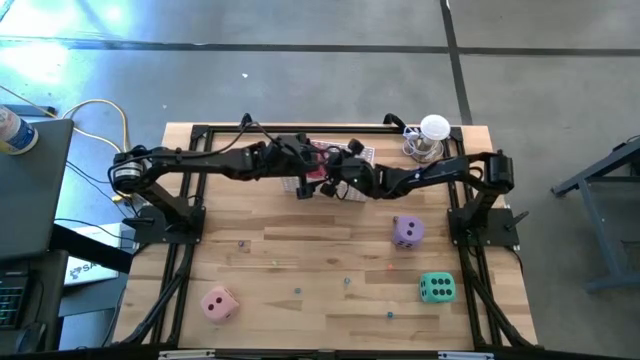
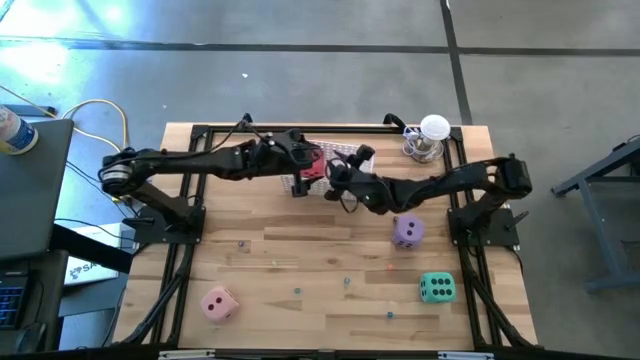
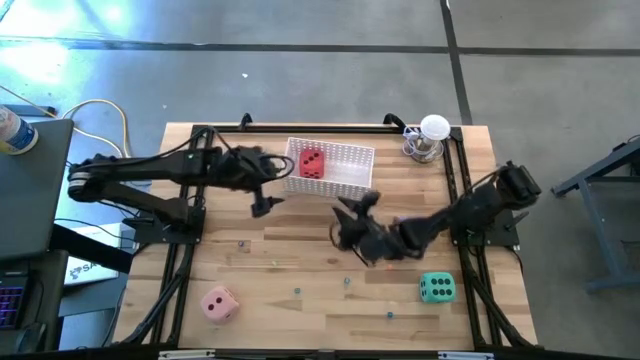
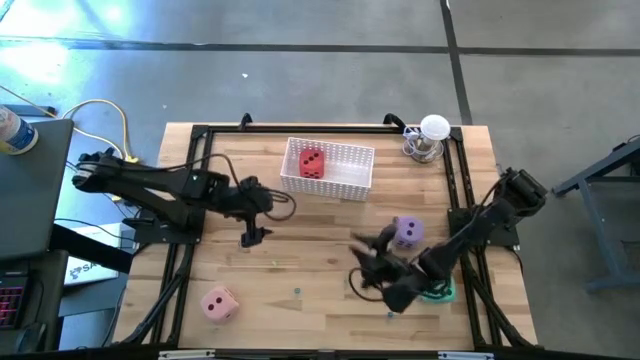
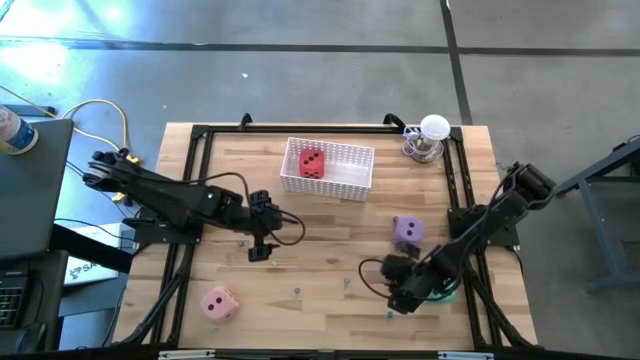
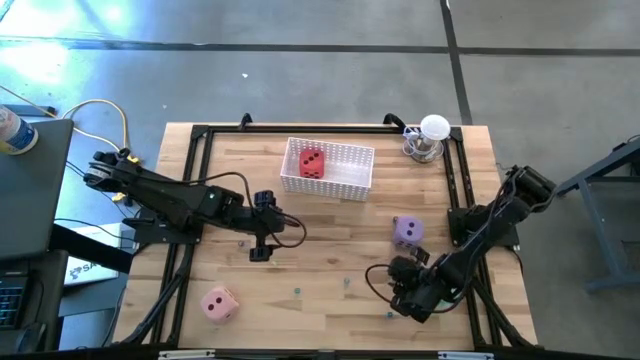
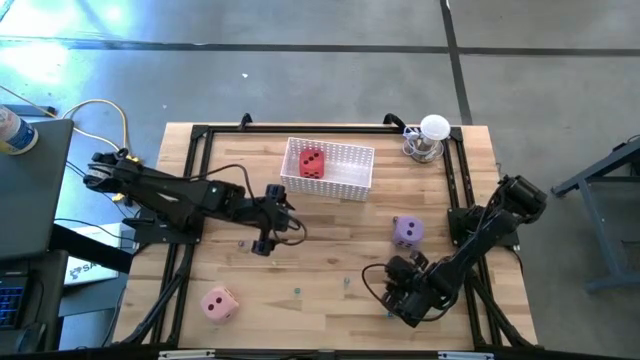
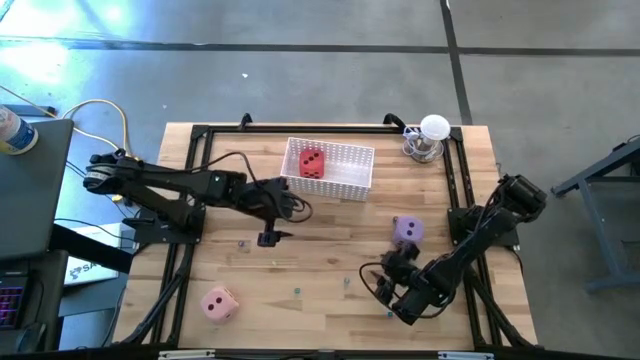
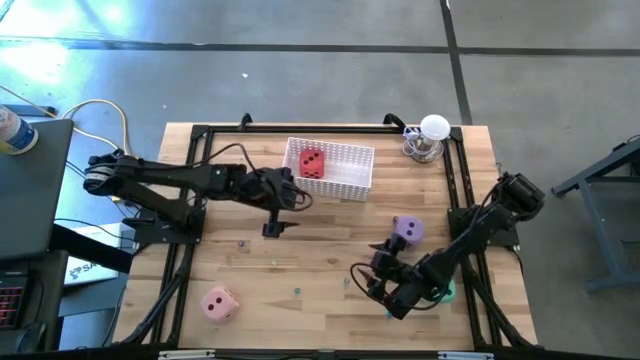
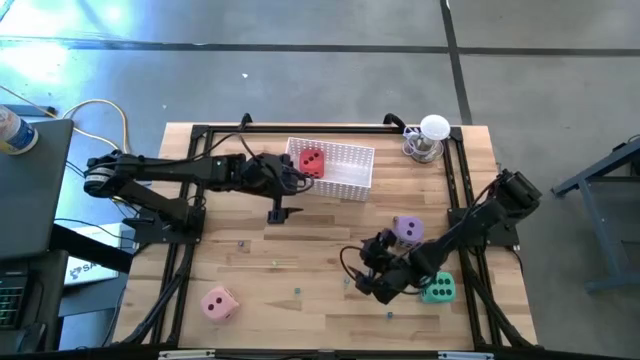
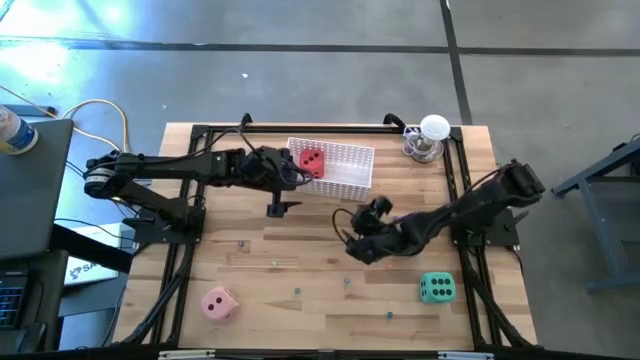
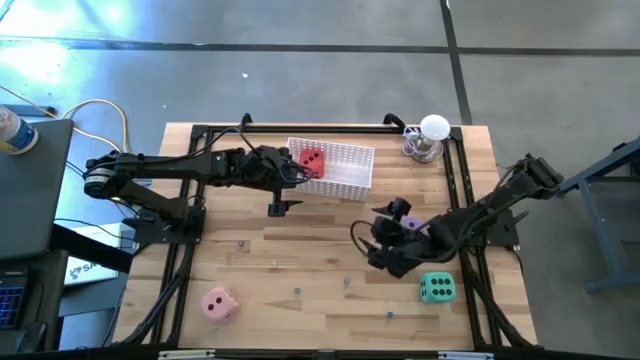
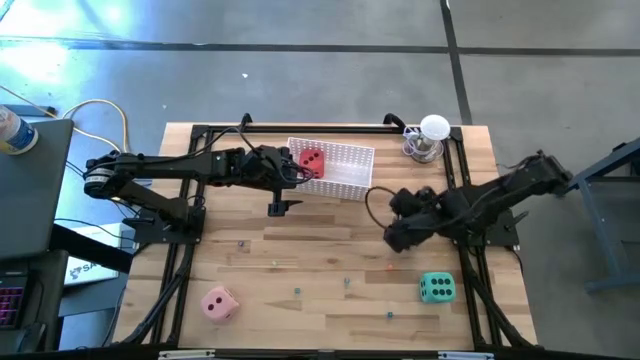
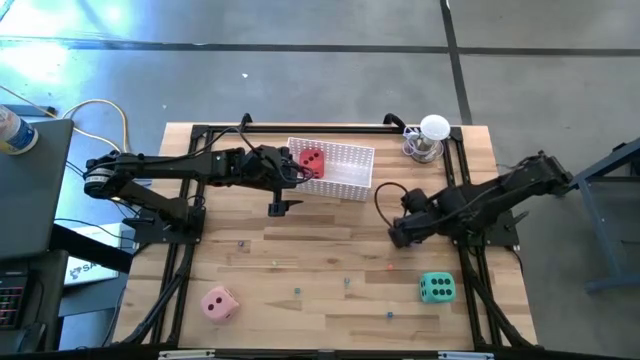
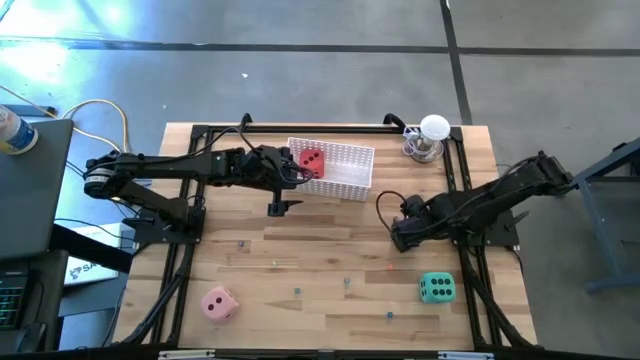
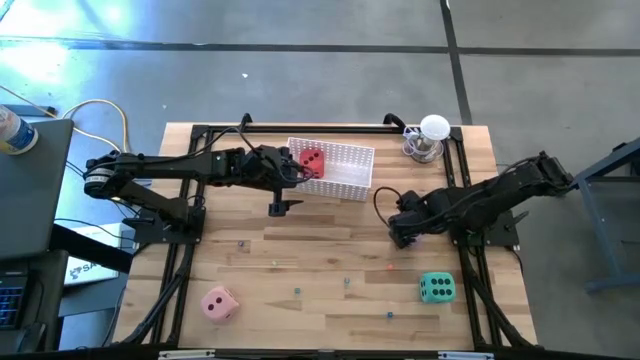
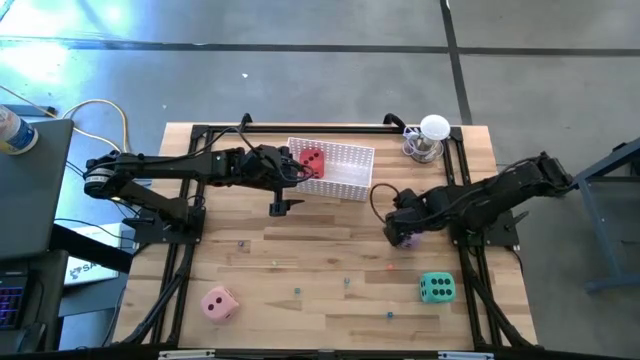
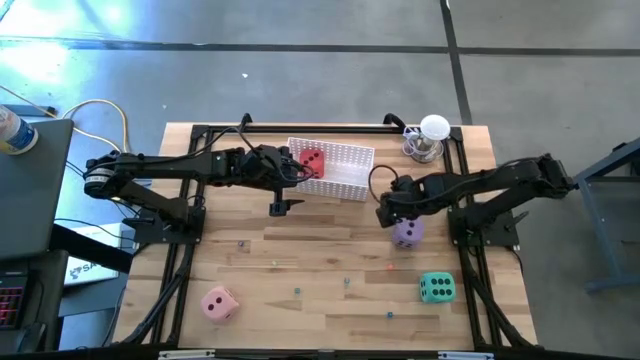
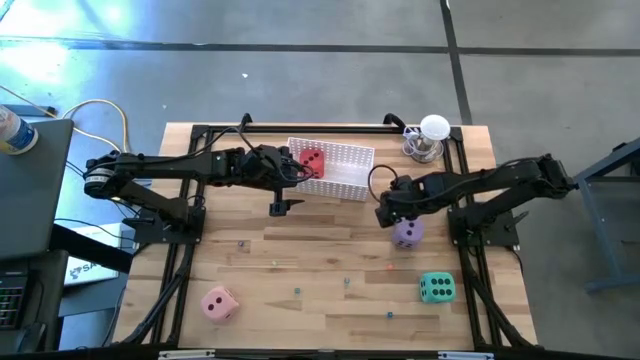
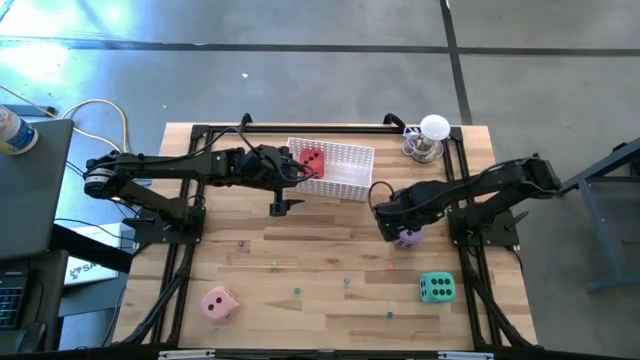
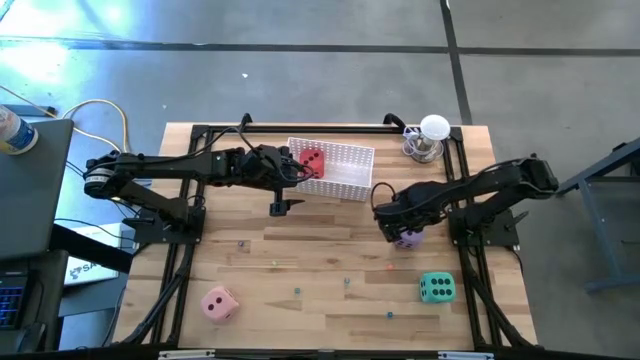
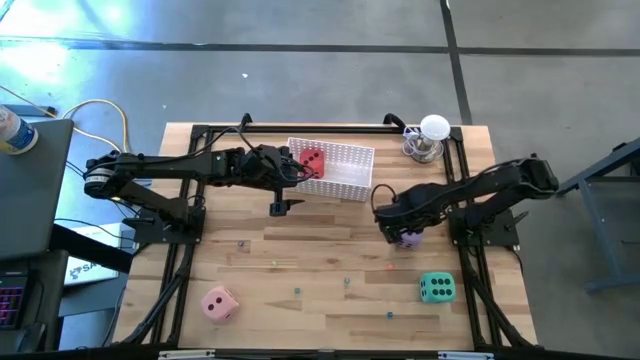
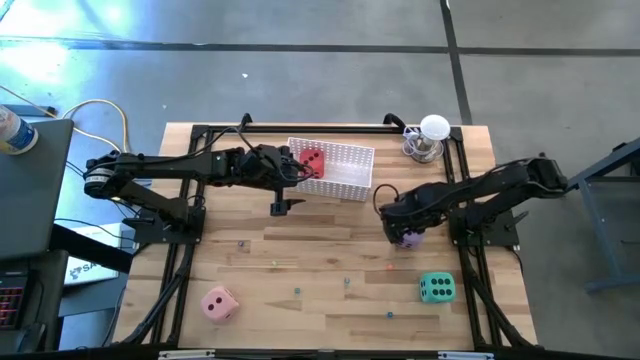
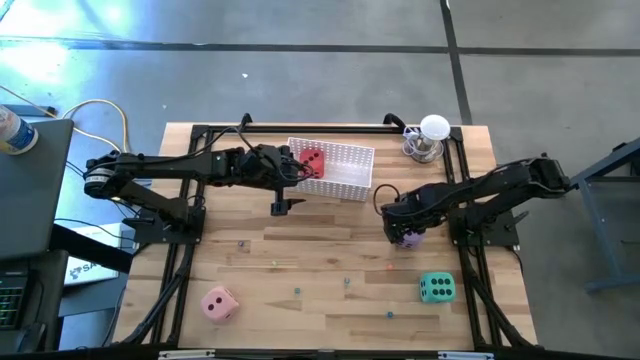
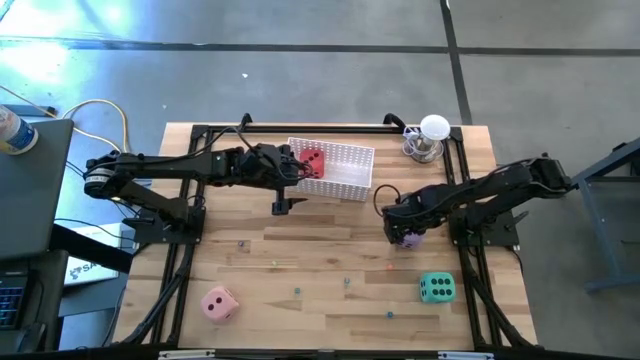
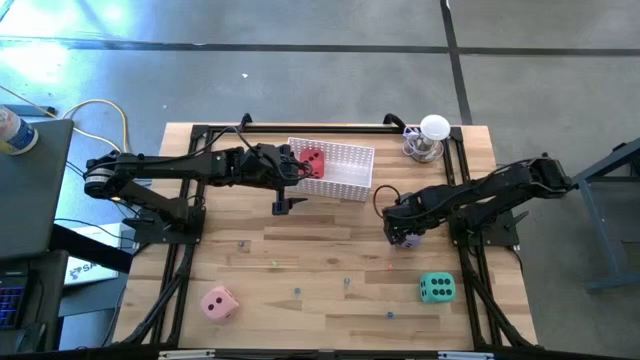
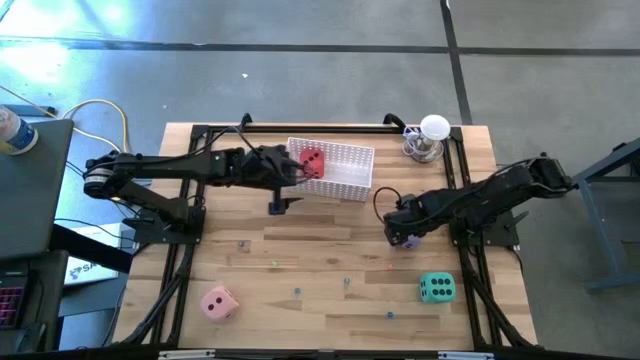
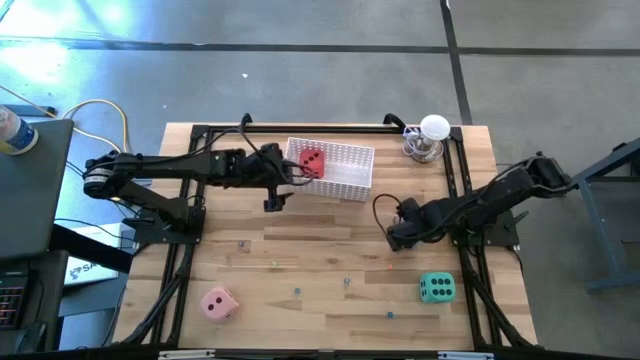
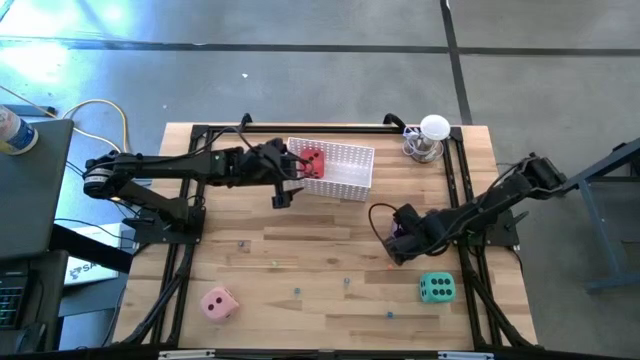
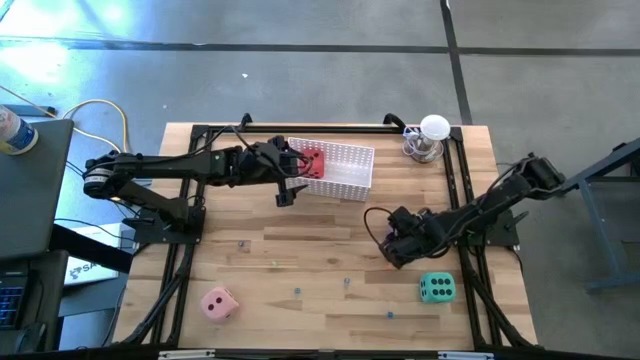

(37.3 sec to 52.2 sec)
Task: Pick & Place Dice
Put the big violet die into the white bin

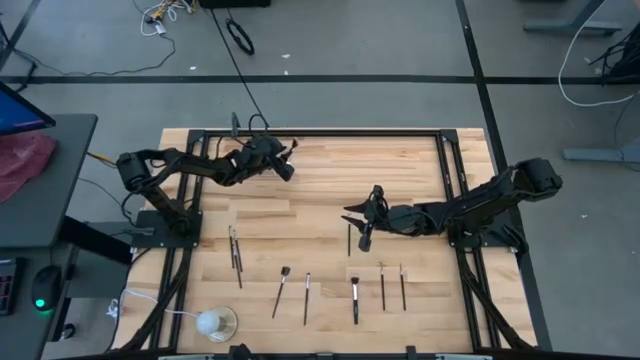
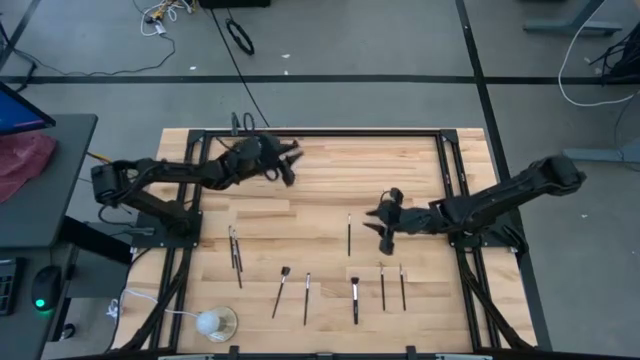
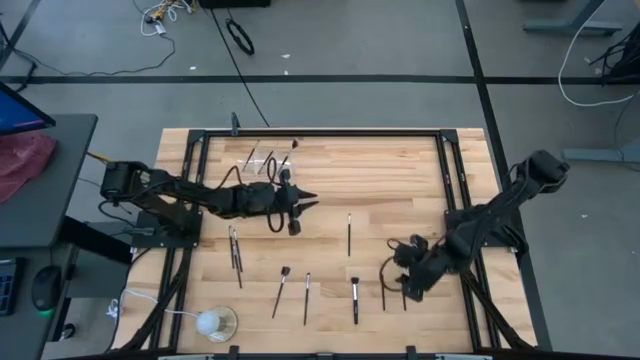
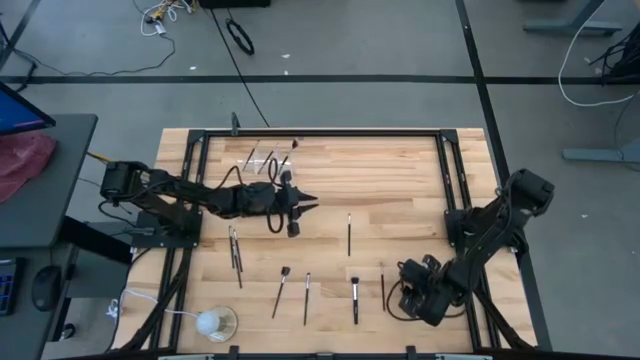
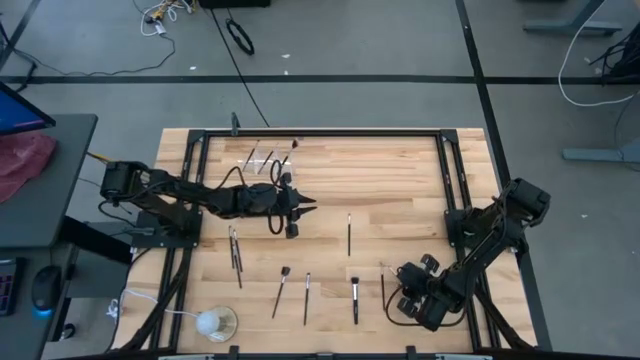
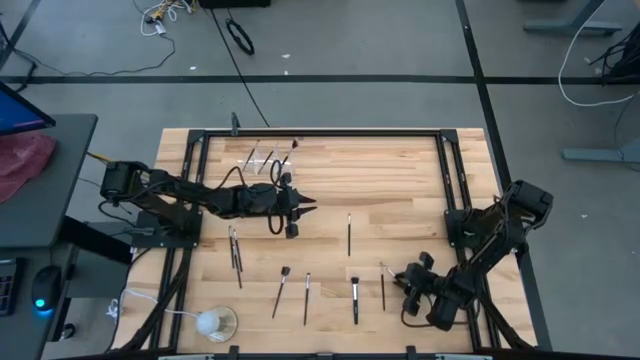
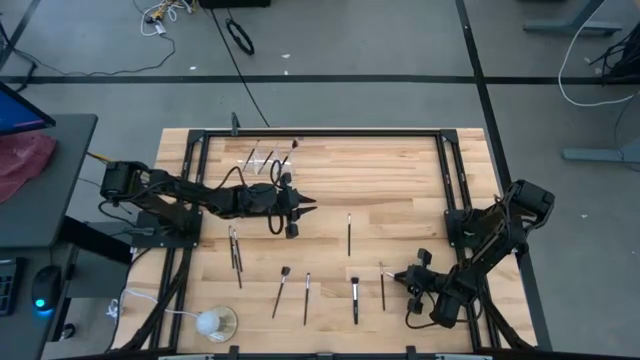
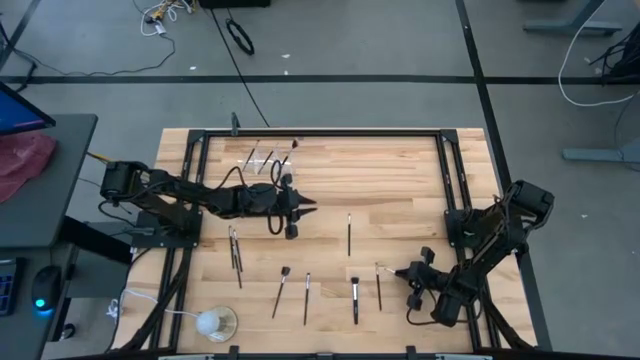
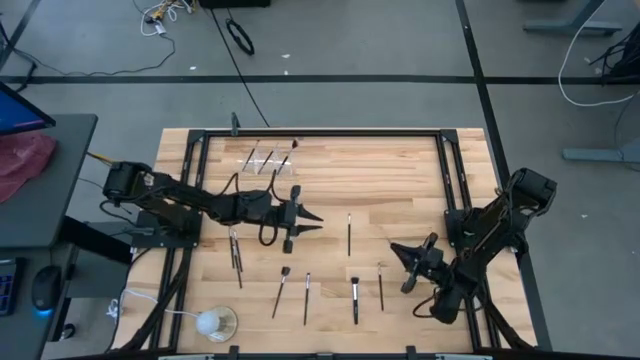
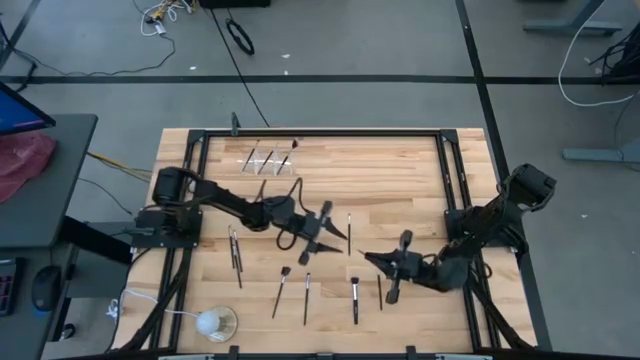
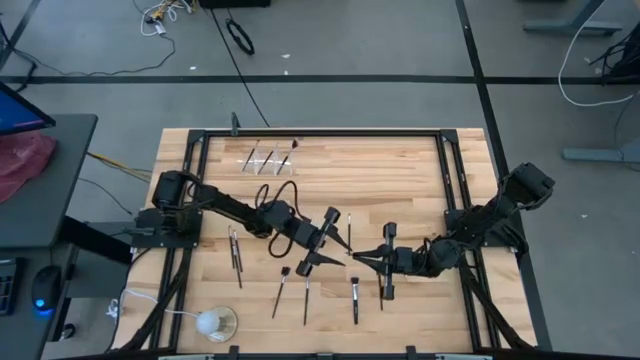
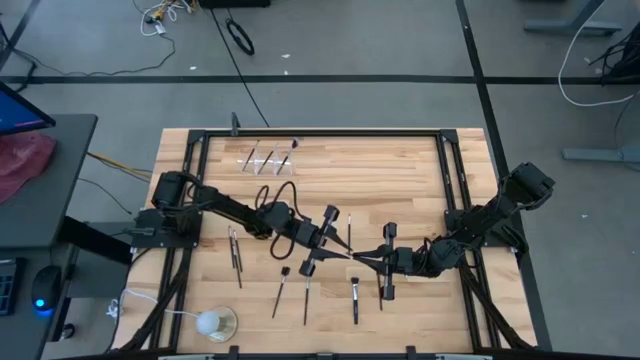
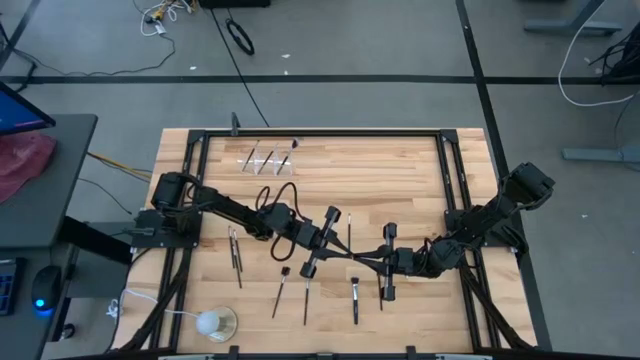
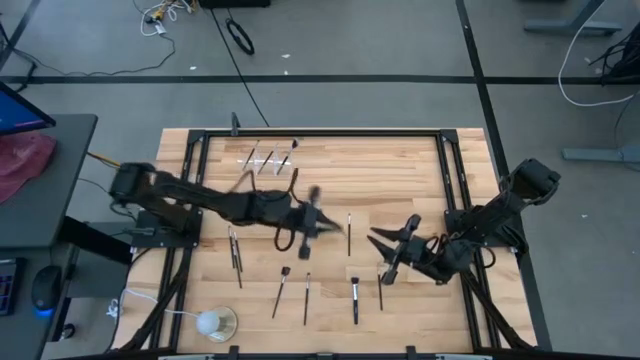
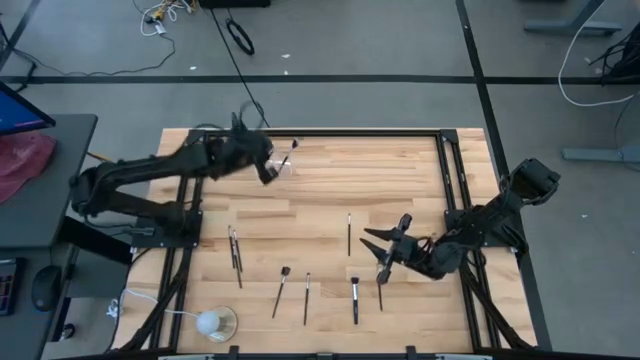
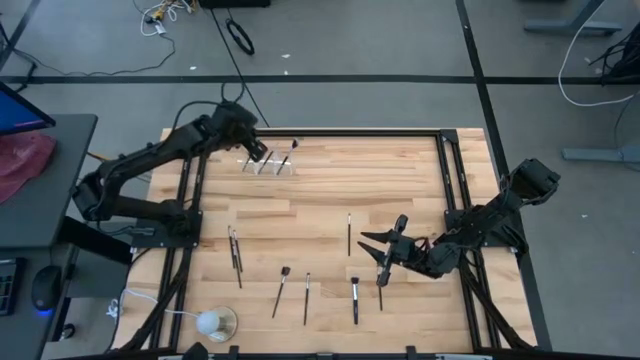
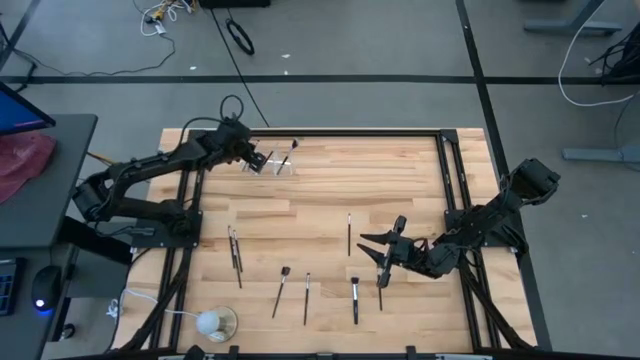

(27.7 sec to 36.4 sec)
Task: Put items in baskets/containers
Put the liner brush into the left section of the transparent organizer
